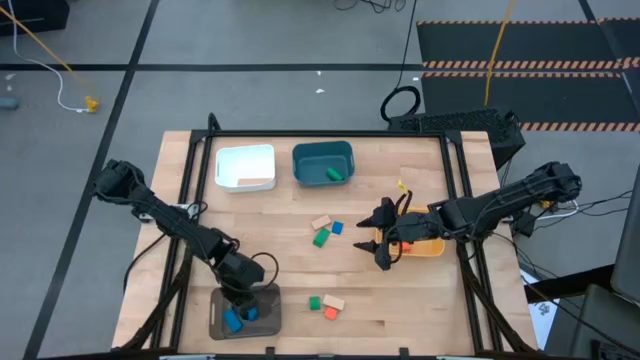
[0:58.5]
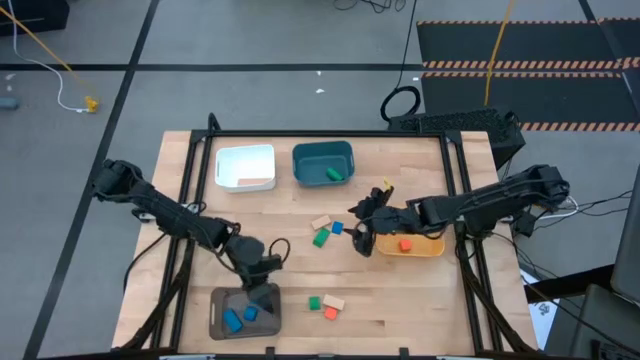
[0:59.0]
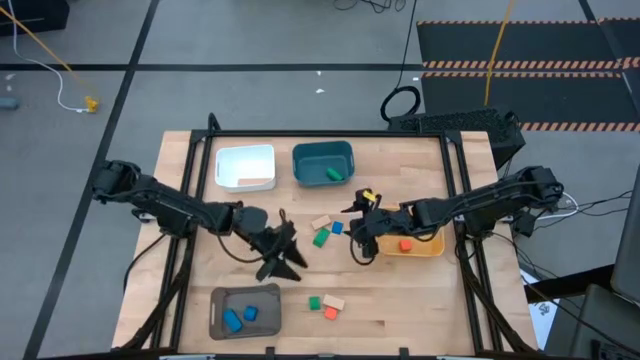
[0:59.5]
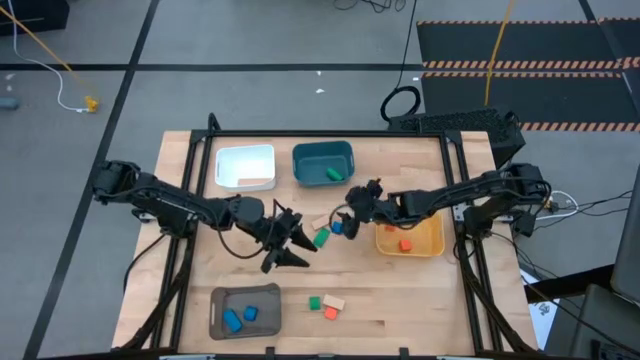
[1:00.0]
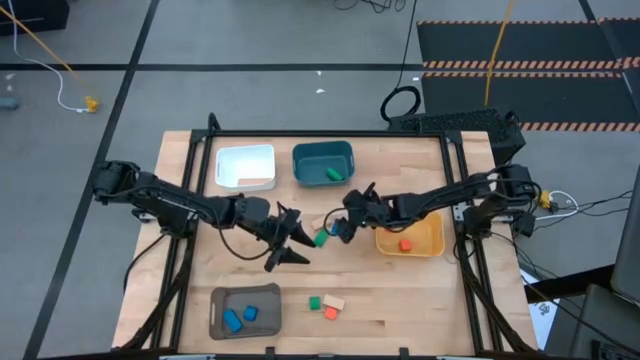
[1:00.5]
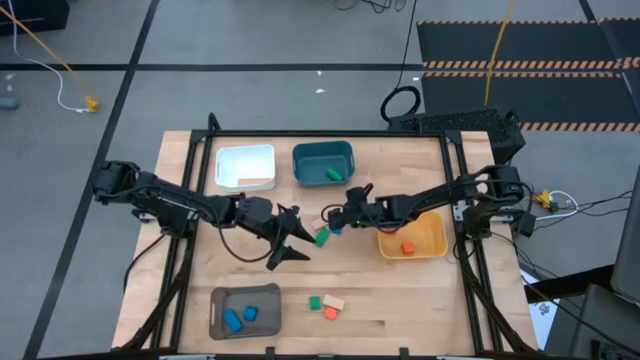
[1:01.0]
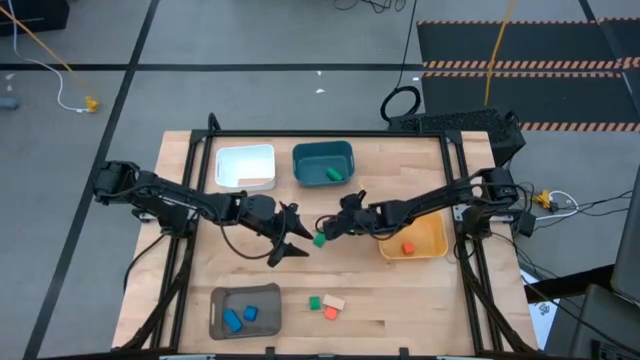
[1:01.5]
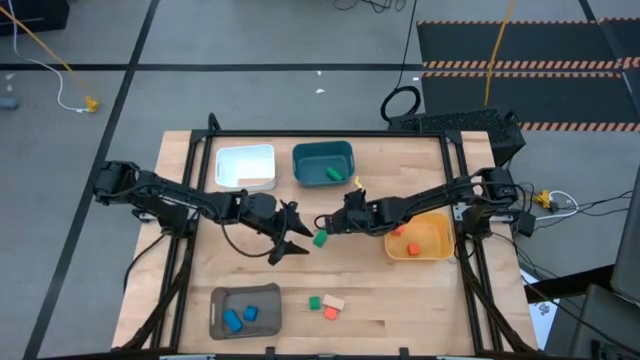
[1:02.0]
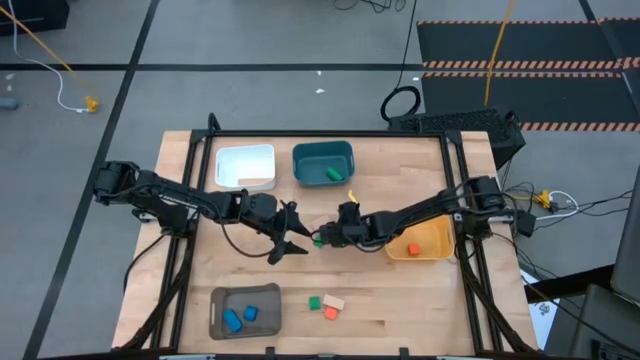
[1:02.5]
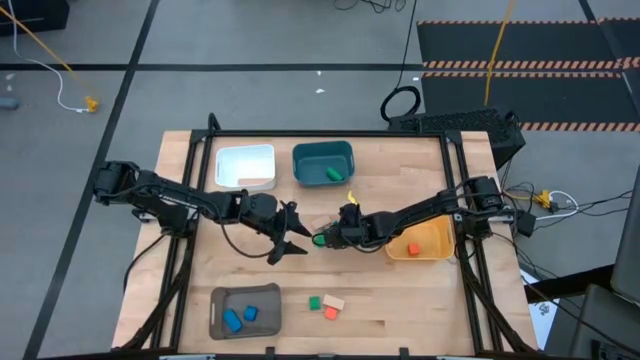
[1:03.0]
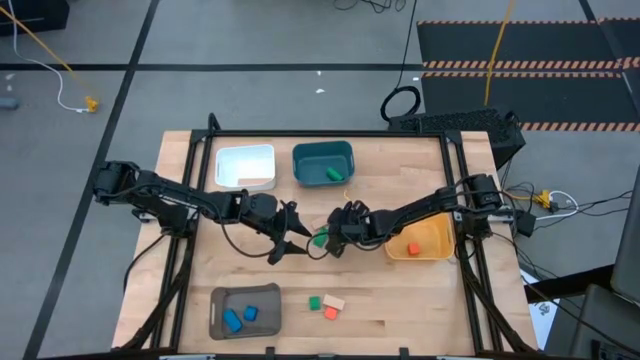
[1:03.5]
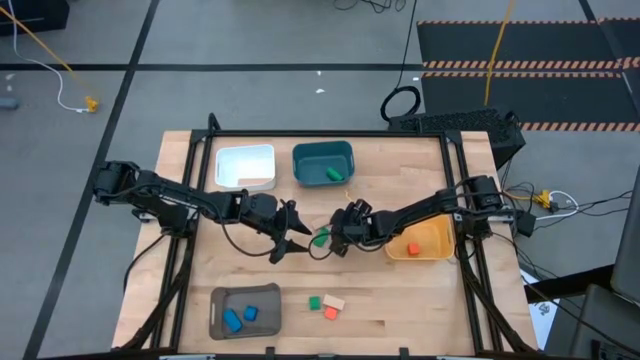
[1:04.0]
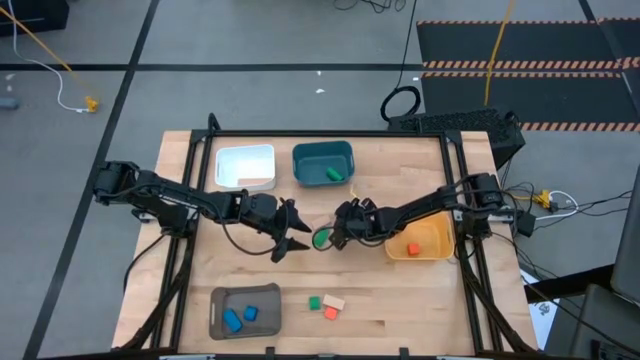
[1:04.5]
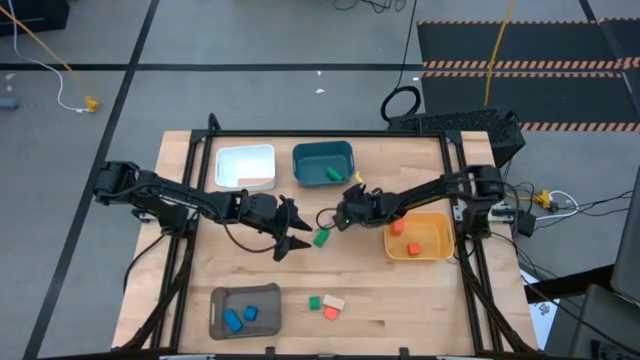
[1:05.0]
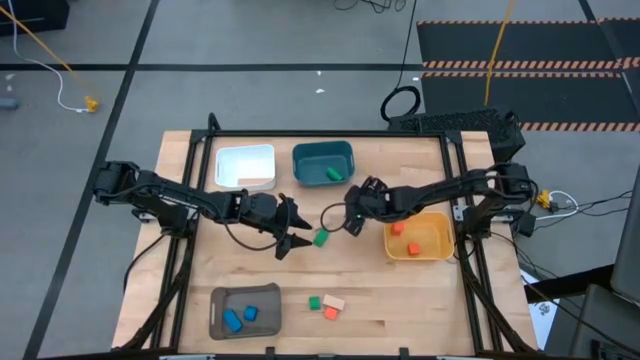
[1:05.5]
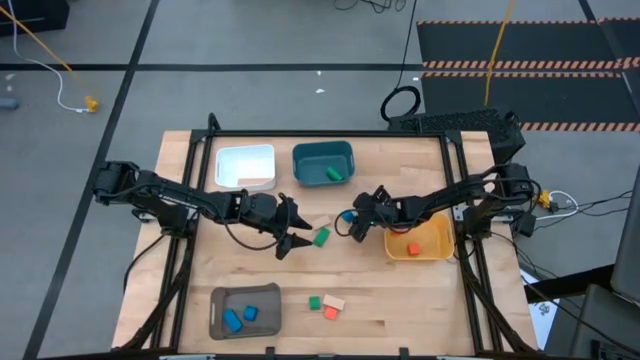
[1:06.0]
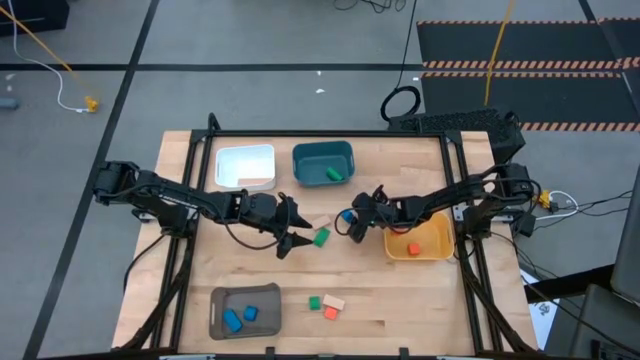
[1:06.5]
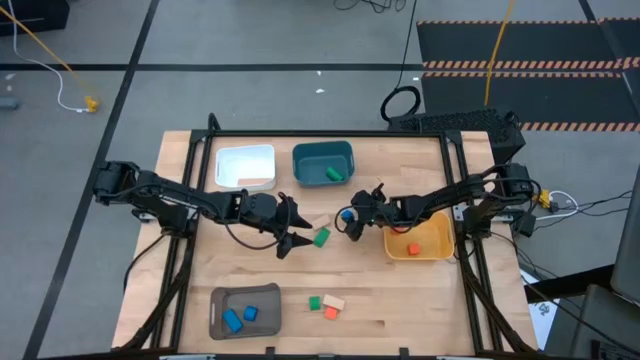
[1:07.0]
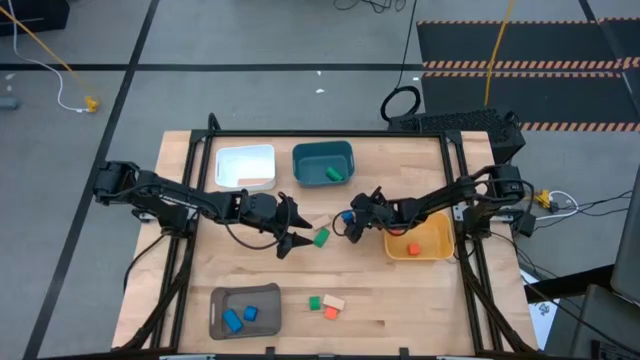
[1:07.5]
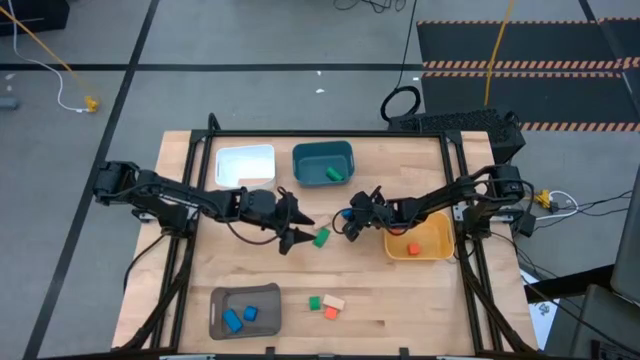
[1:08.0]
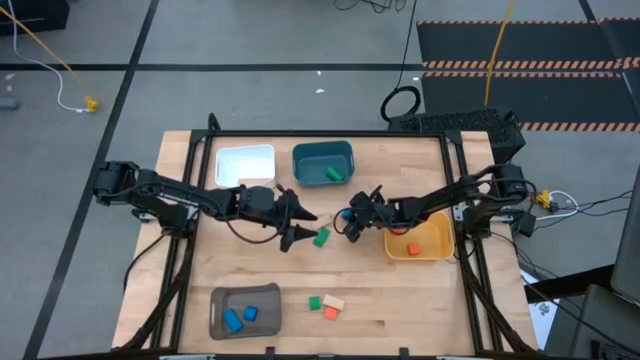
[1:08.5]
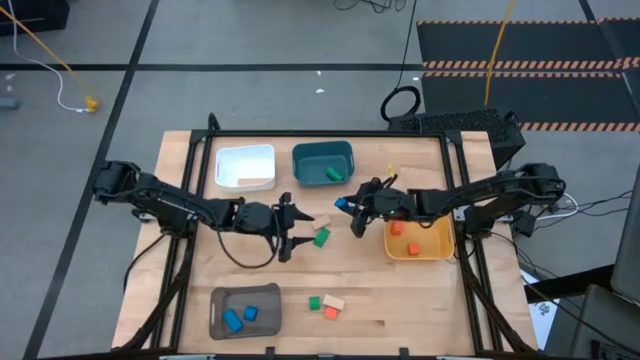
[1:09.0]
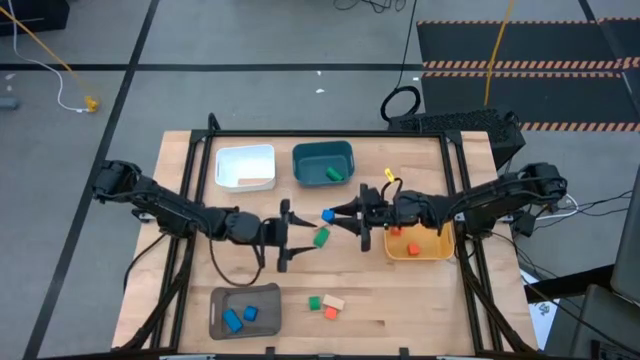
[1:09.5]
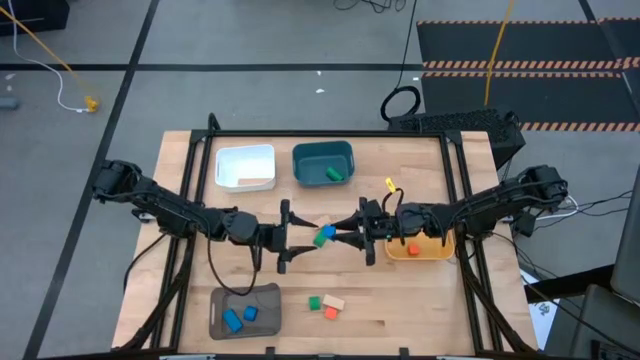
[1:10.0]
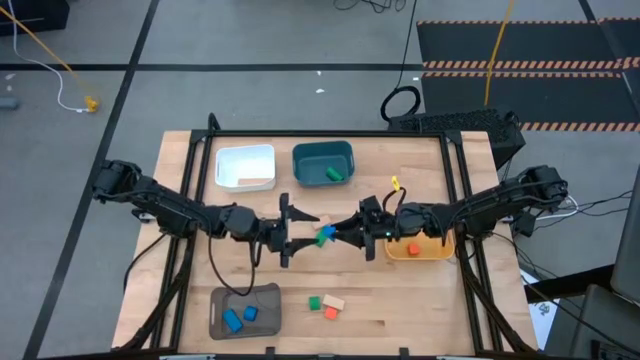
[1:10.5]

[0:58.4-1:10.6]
Task: Sort & place blocks by color
Put the blue block into the black bin

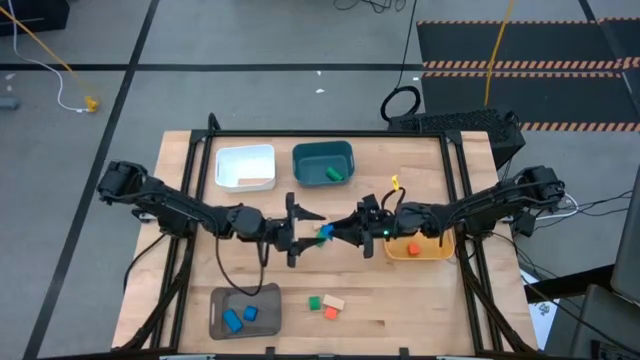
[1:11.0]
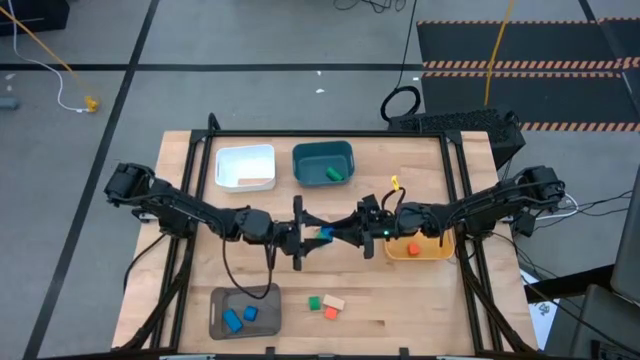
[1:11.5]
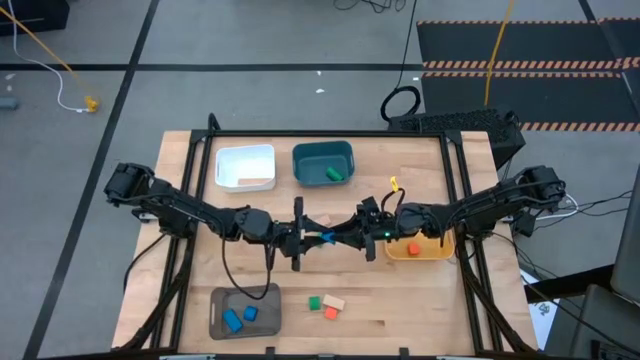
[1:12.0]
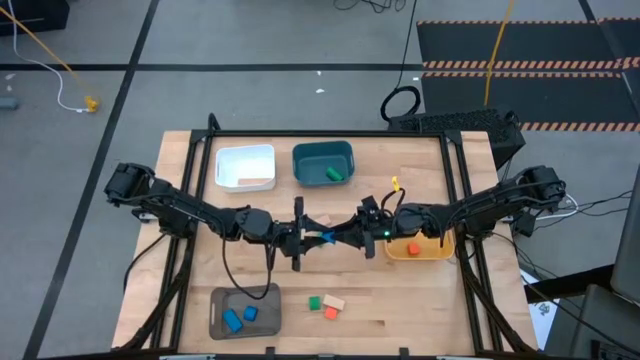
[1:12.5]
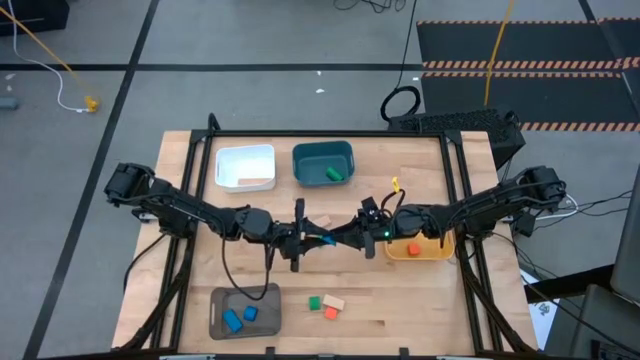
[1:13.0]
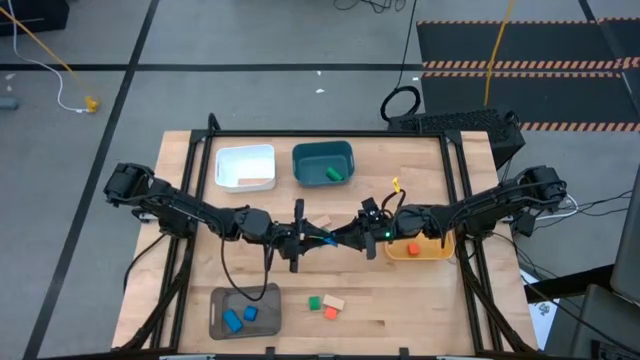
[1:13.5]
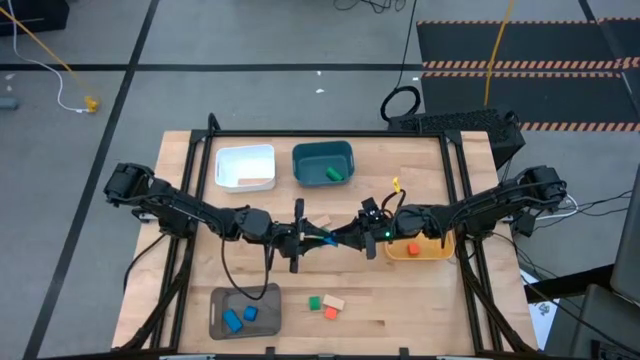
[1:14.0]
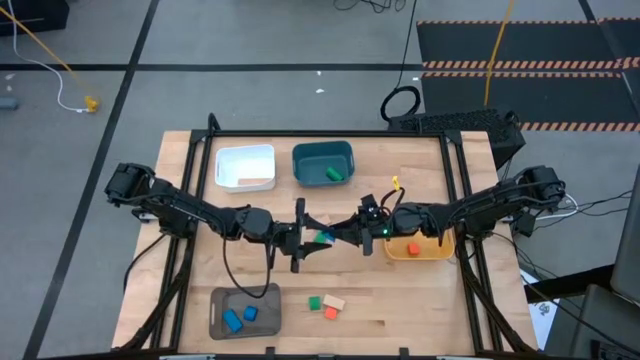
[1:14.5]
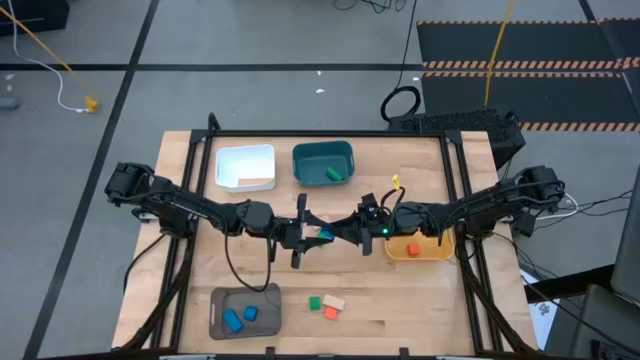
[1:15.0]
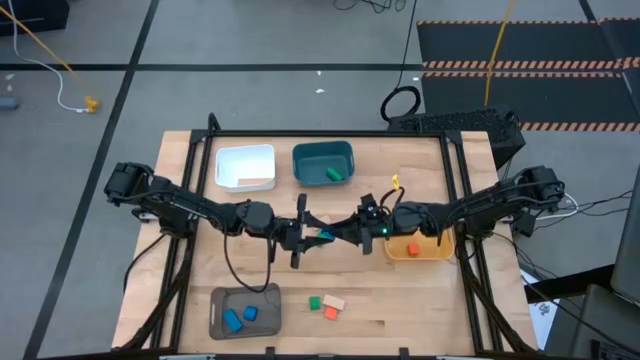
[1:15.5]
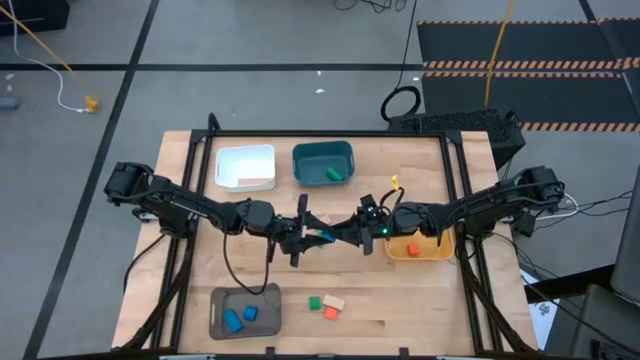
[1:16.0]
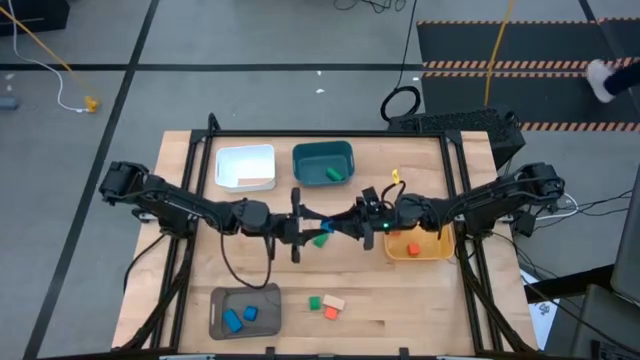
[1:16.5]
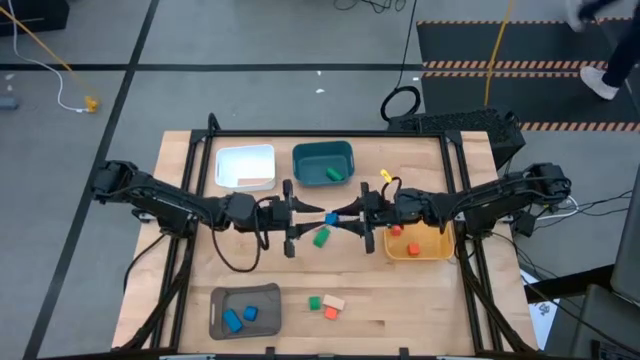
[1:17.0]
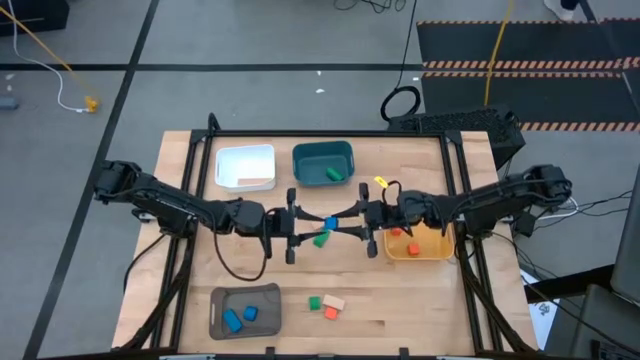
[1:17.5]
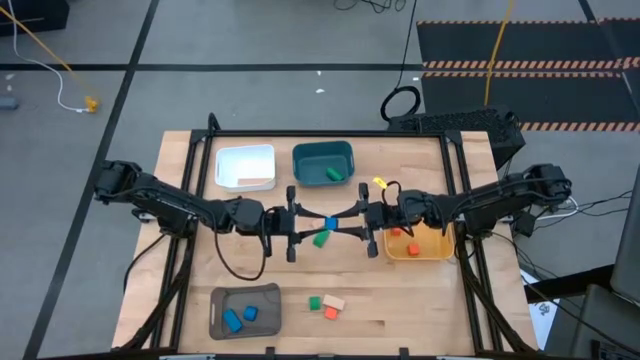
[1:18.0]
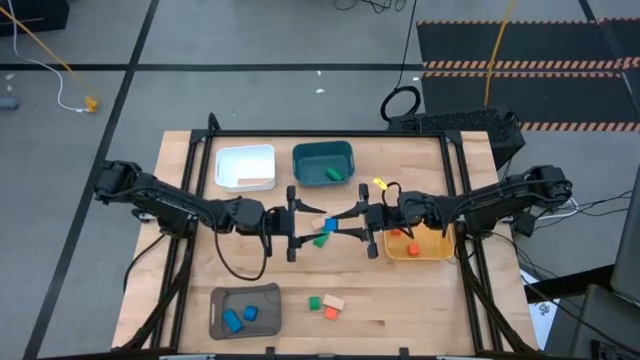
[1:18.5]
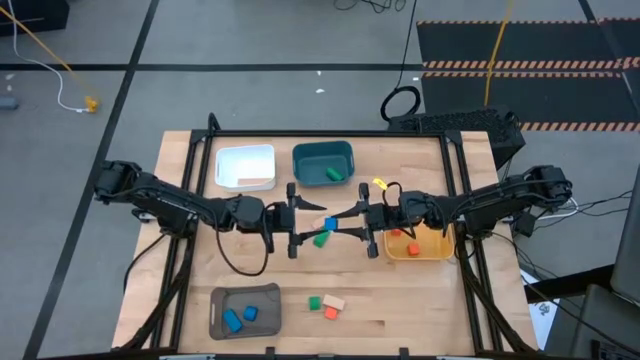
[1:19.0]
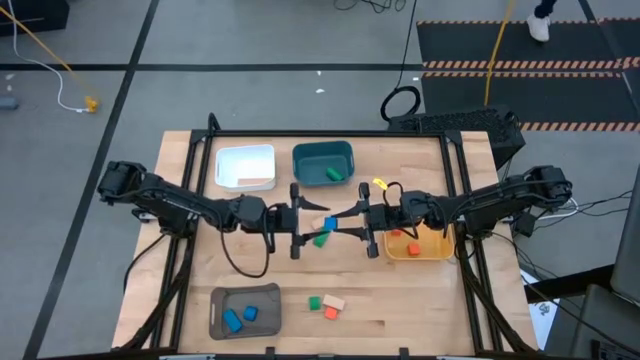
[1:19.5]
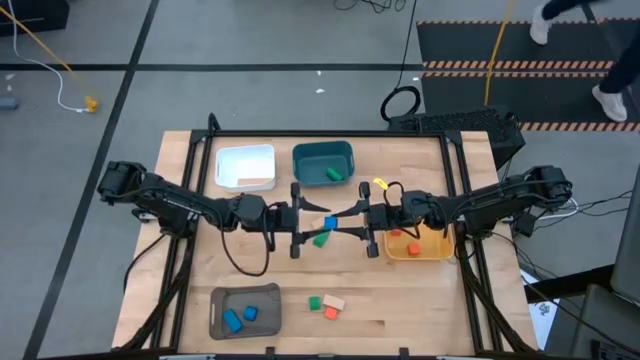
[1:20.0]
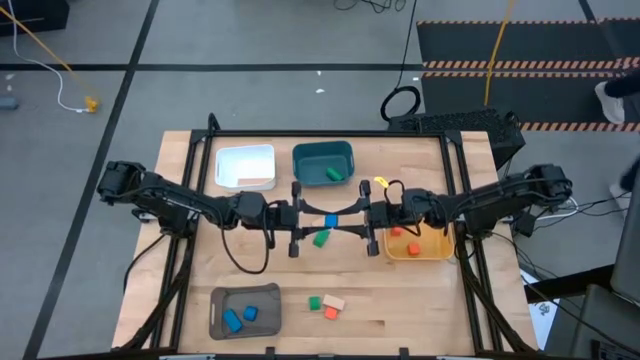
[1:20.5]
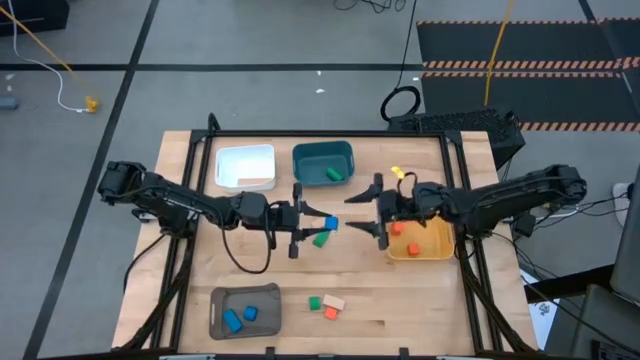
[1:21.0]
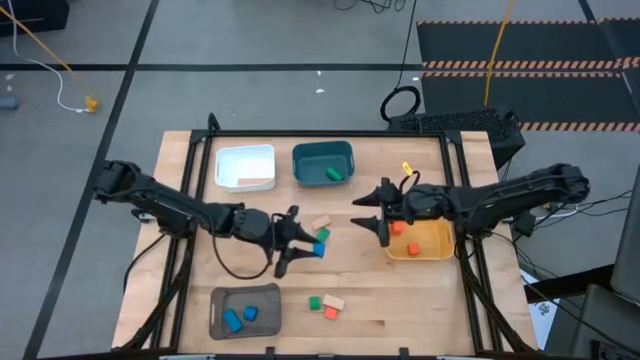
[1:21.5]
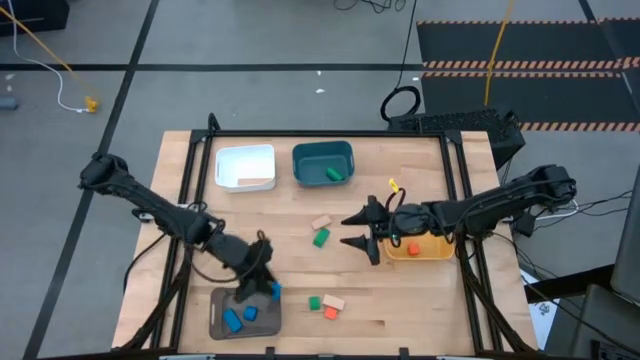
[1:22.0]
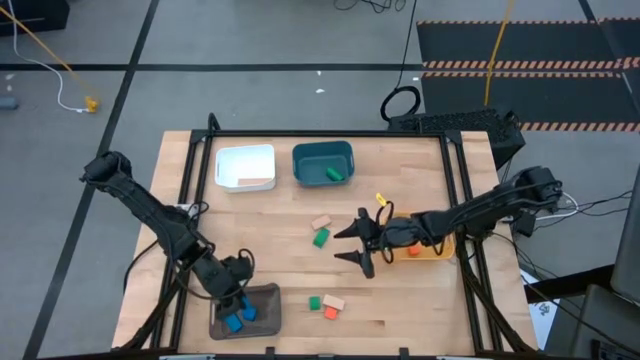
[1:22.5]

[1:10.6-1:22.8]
Put the blue block into the black bin
